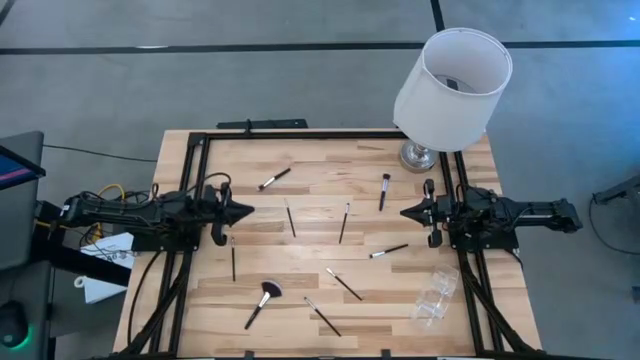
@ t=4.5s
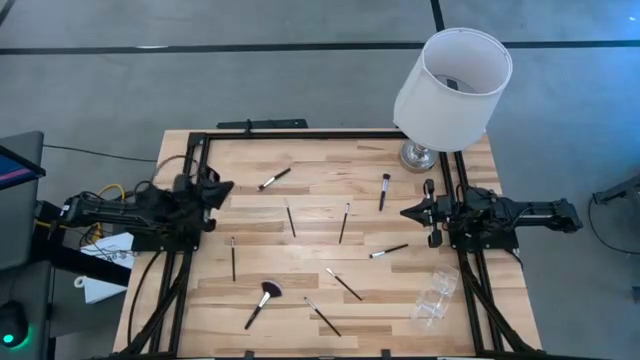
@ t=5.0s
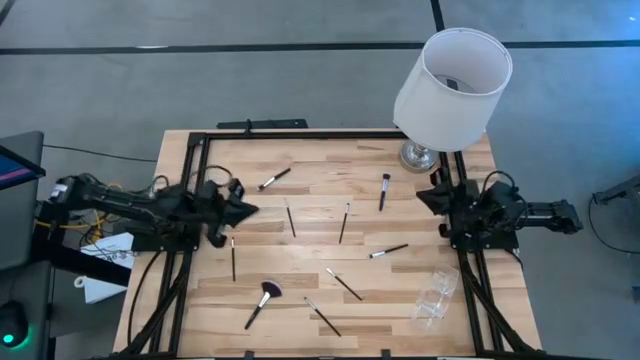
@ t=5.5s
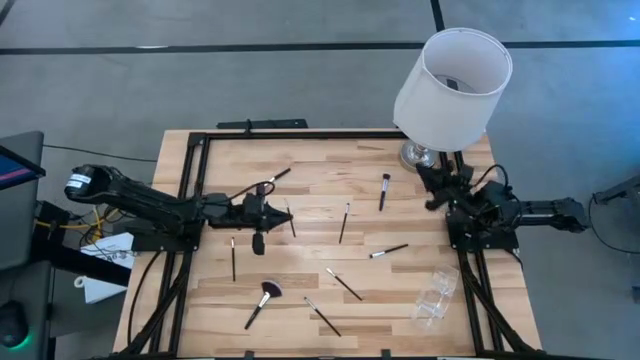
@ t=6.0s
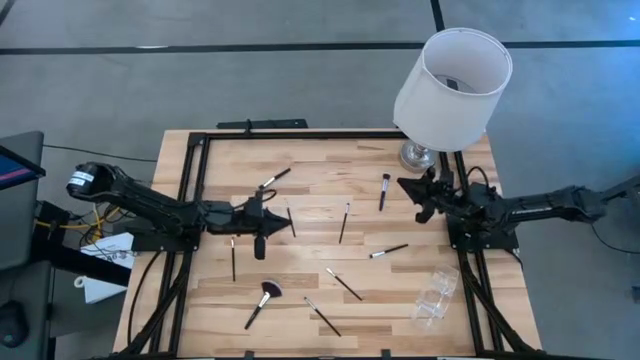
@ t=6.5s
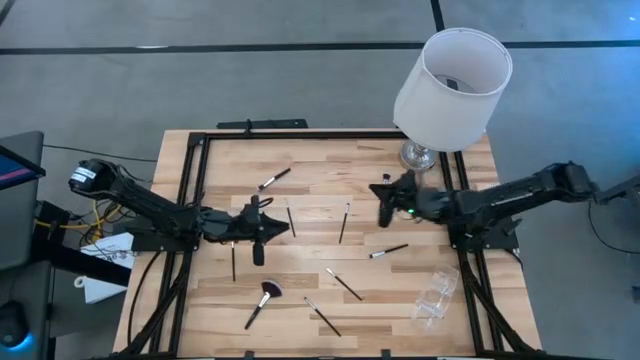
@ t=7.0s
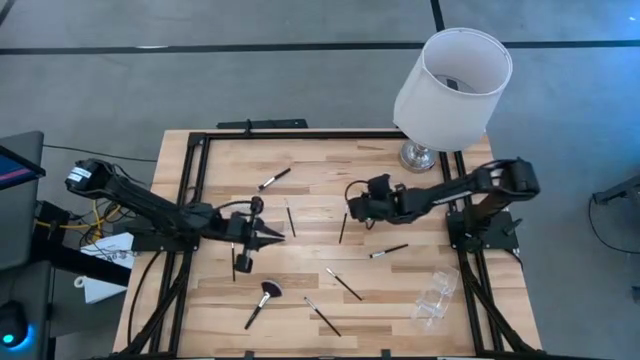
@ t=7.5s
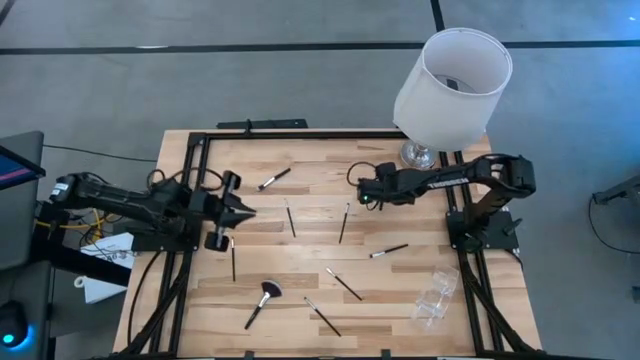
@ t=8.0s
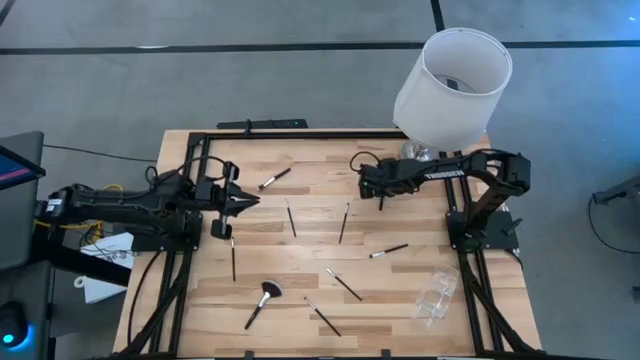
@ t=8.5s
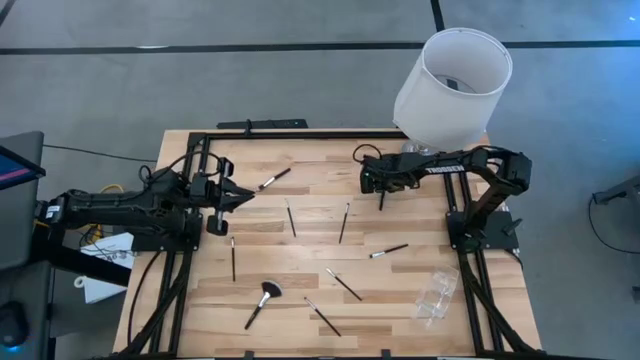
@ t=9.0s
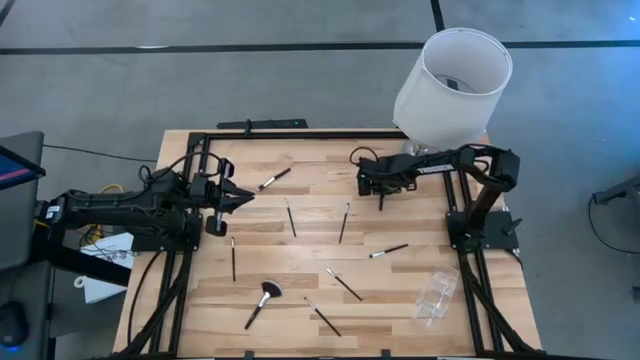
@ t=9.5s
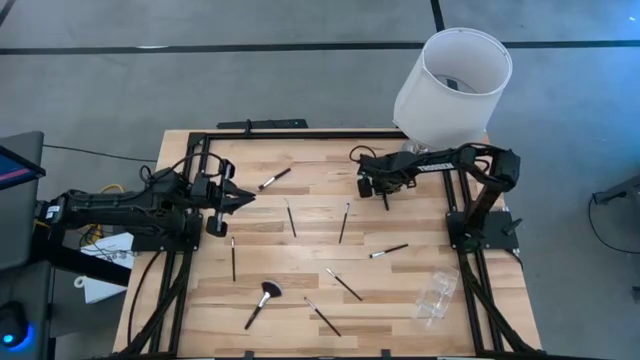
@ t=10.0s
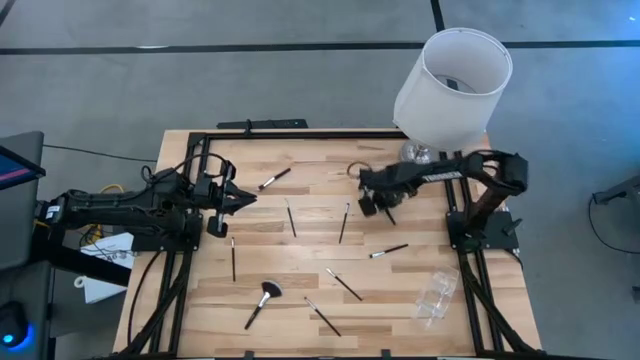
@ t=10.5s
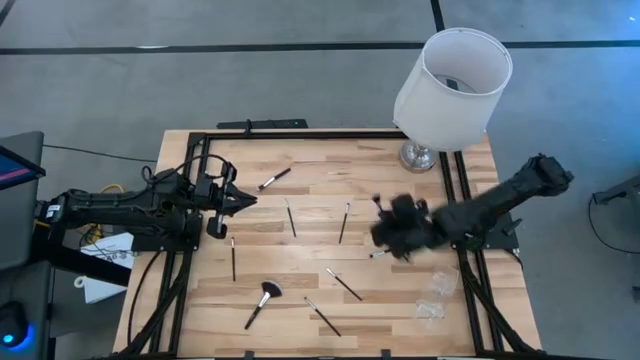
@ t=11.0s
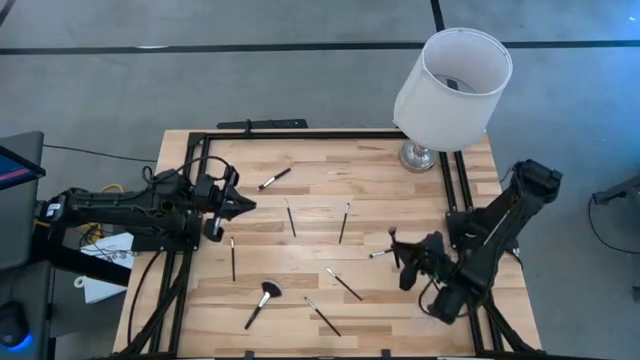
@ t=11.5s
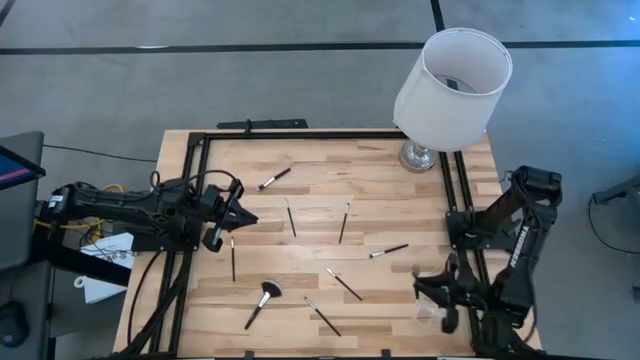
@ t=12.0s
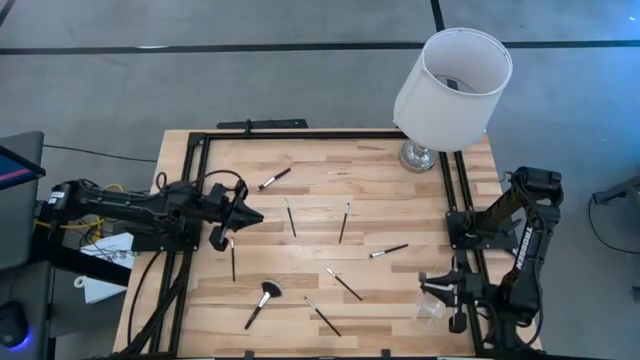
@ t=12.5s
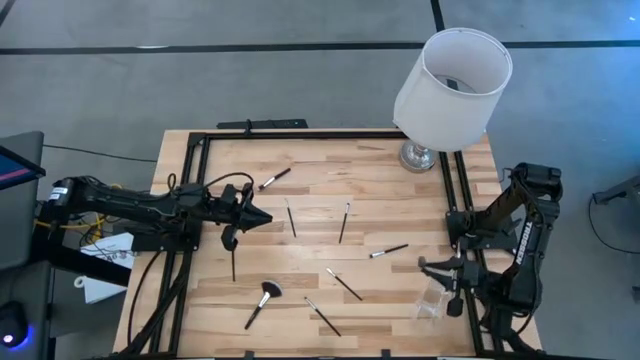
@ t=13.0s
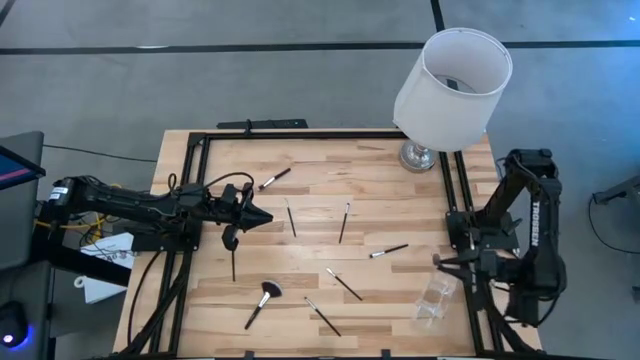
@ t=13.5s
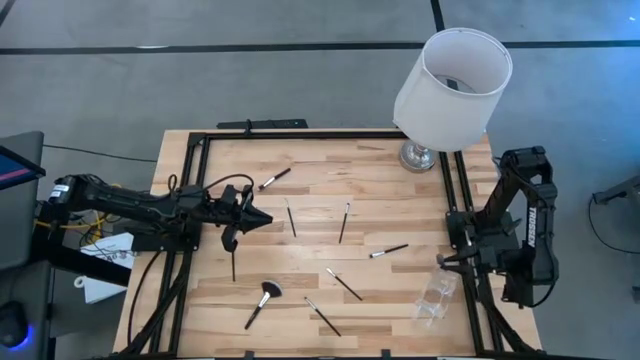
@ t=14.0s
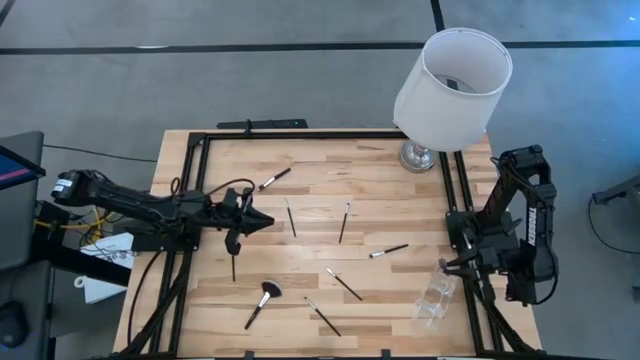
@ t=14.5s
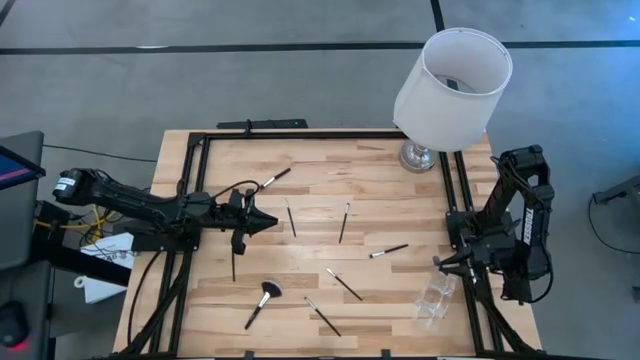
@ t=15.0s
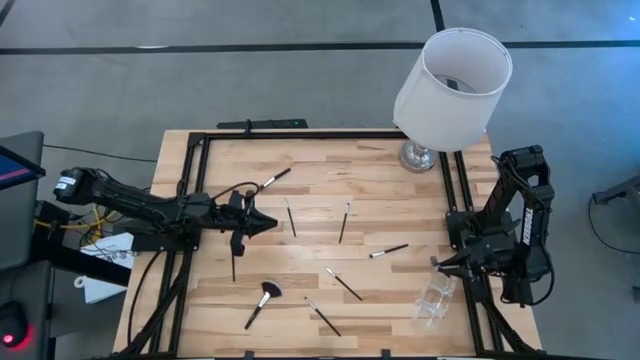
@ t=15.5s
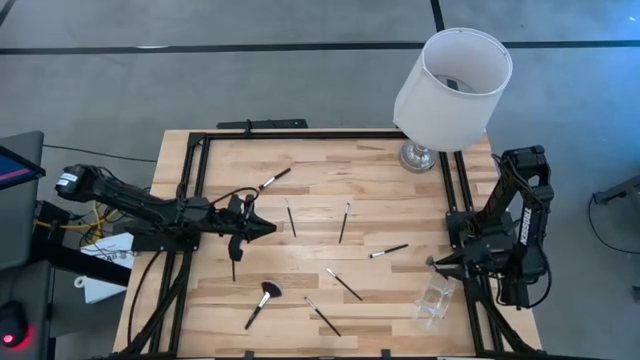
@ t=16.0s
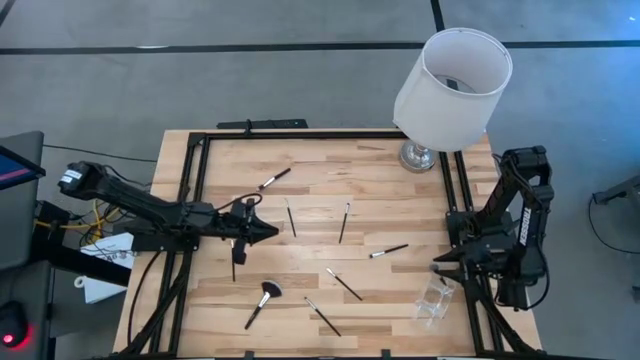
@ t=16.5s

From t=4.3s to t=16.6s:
Task: Pick & Place Makeup Brushes
Put the black powder brush into the transparent organizer

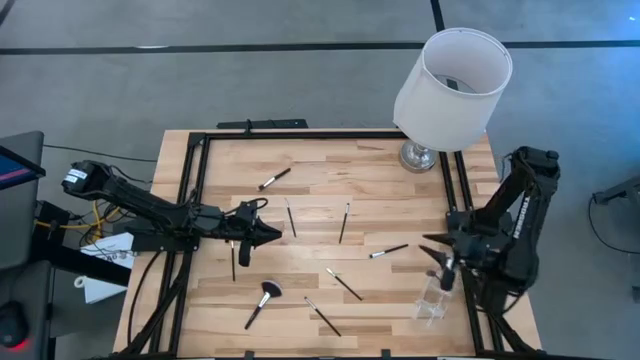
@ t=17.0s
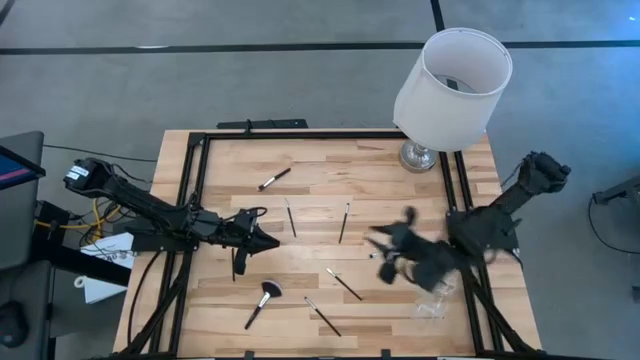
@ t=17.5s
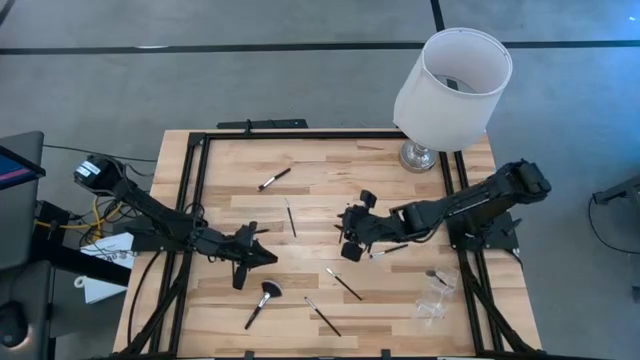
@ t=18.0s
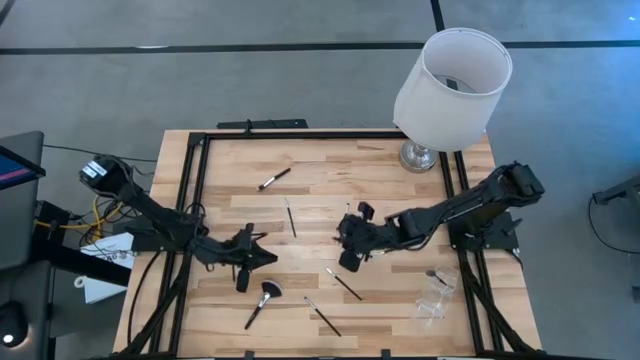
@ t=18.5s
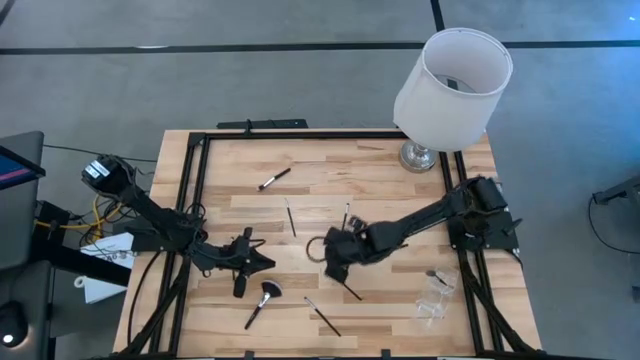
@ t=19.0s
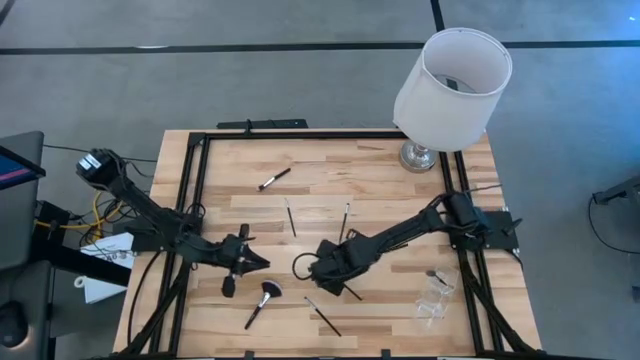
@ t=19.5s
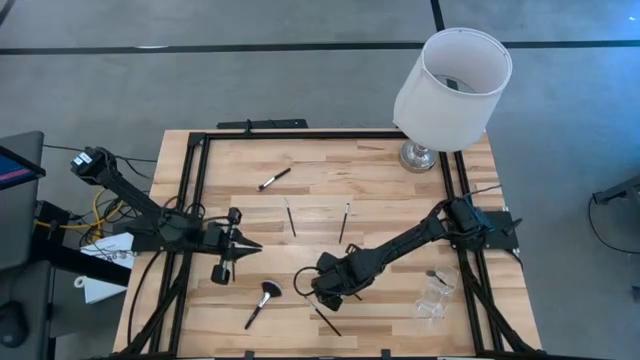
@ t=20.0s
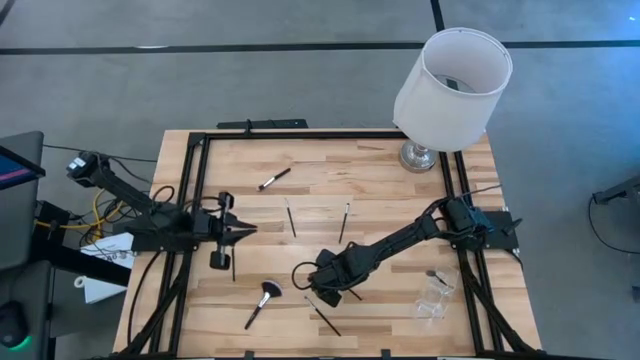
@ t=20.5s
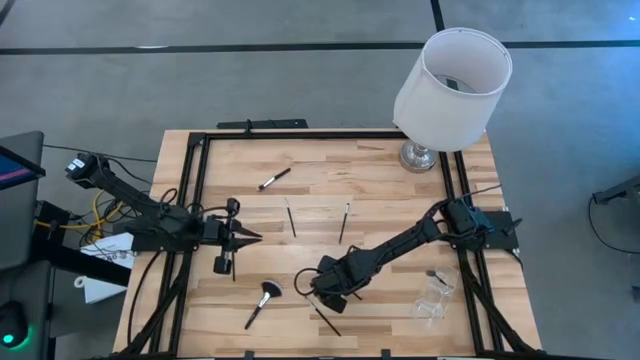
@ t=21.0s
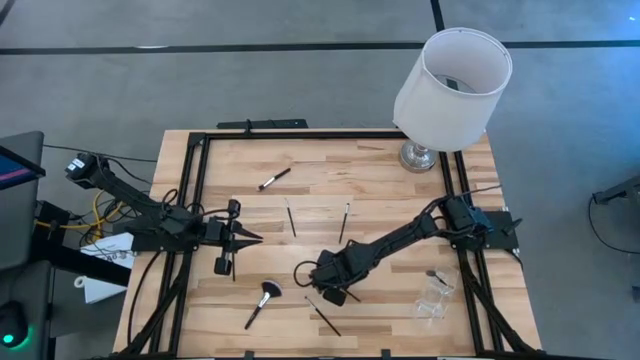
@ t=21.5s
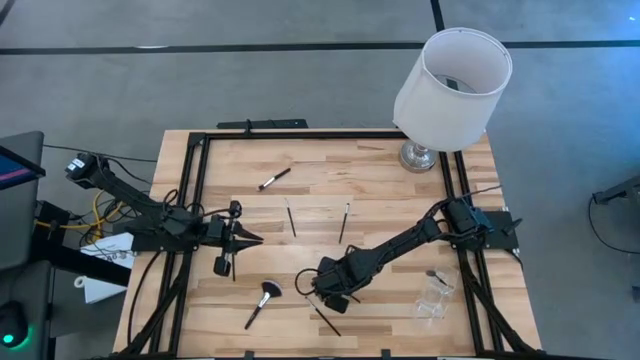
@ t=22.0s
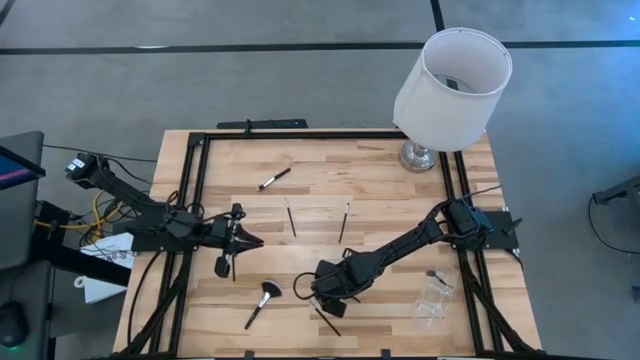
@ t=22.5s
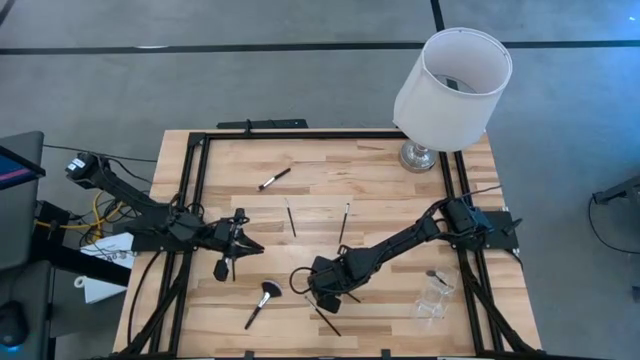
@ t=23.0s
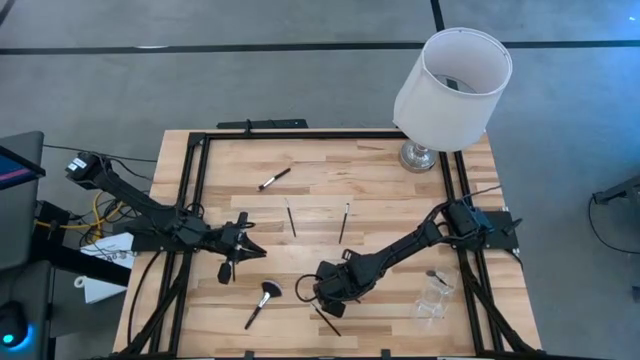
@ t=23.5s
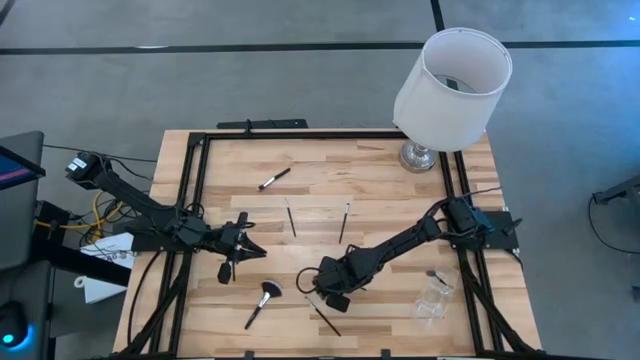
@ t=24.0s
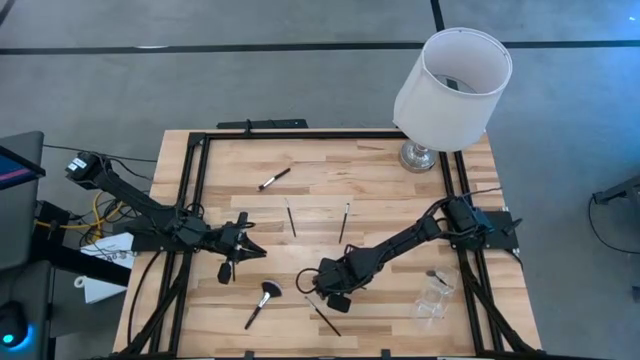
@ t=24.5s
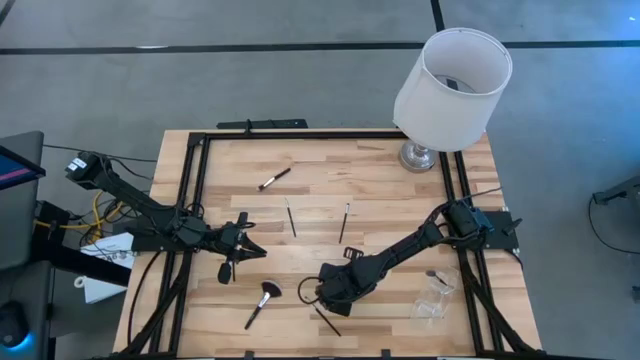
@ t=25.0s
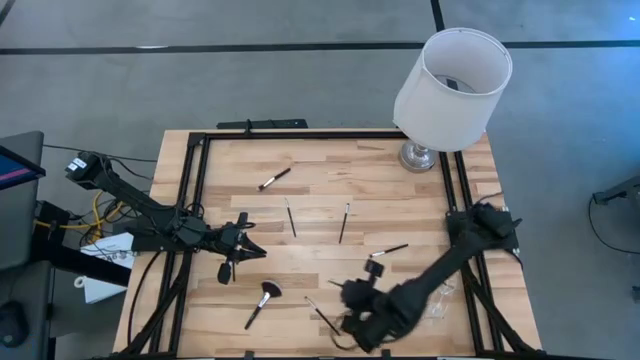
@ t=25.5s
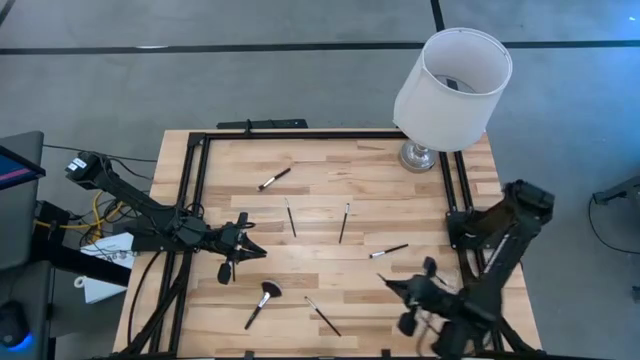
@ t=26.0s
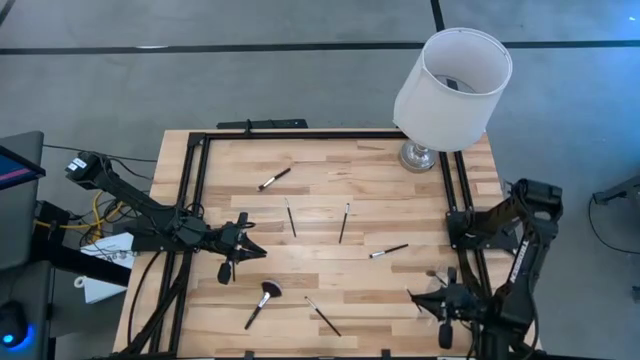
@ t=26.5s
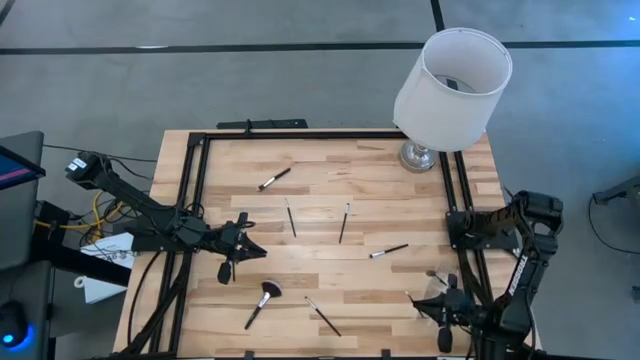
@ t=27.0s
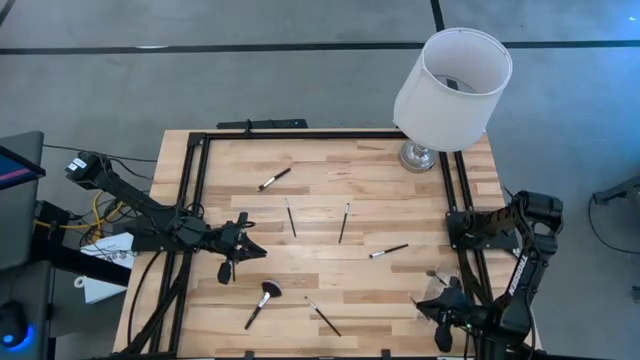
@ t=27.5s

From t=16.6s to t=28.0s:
Put the black eyeshadow brush into the transparent organizer
